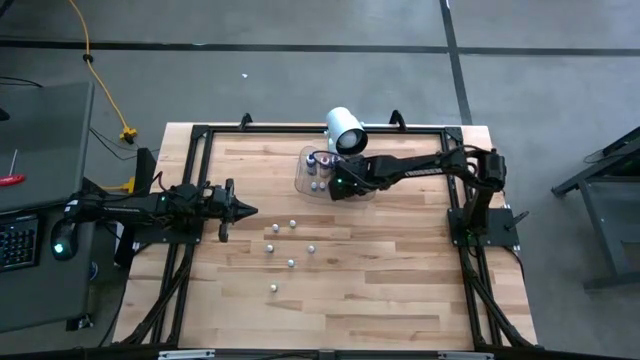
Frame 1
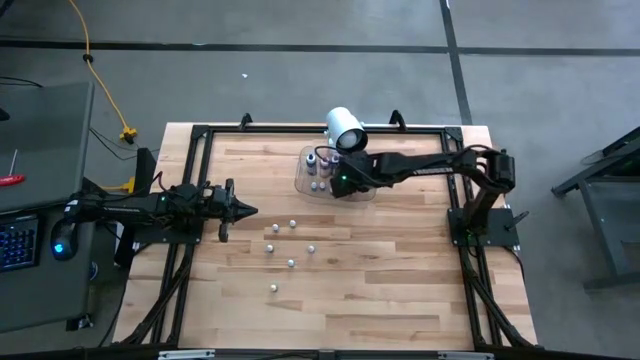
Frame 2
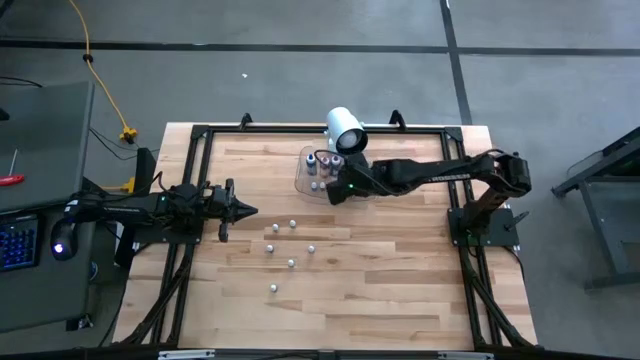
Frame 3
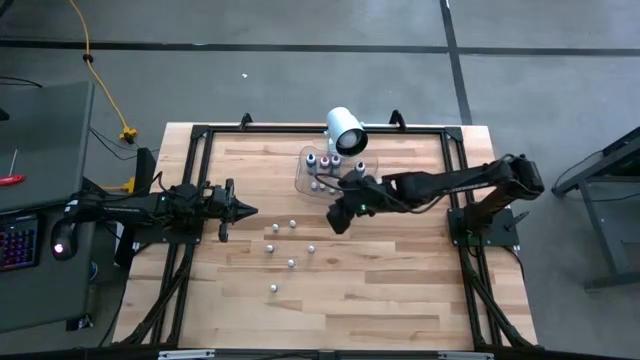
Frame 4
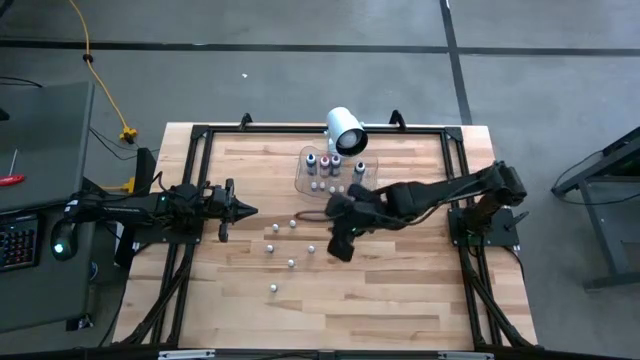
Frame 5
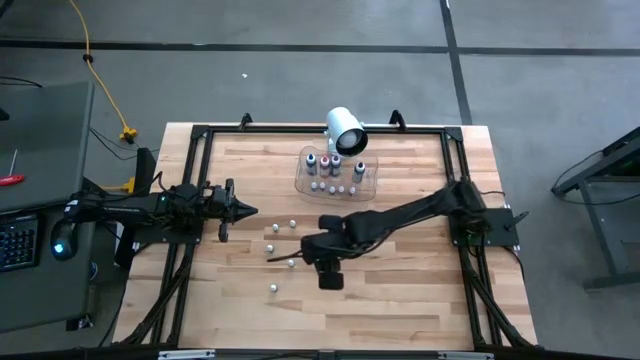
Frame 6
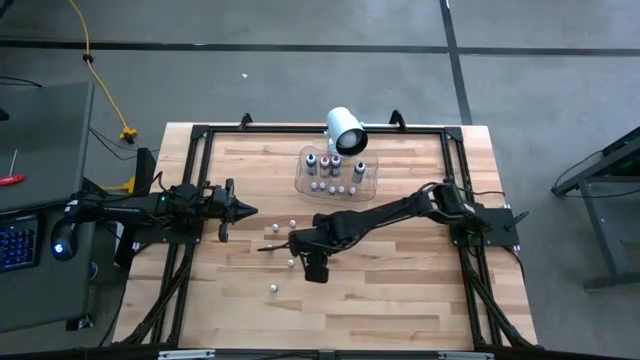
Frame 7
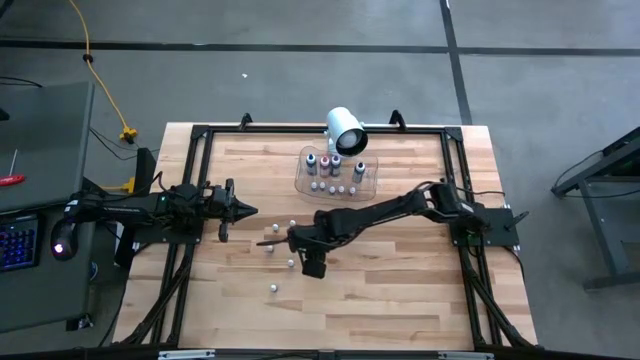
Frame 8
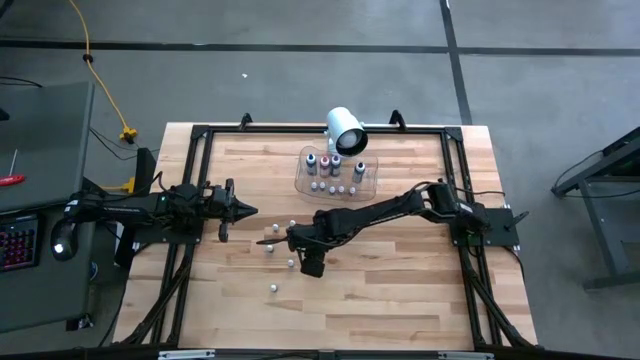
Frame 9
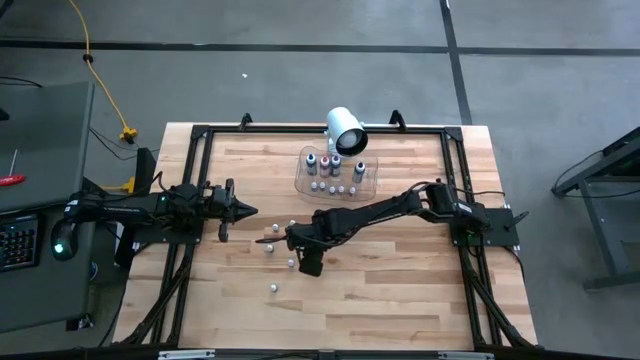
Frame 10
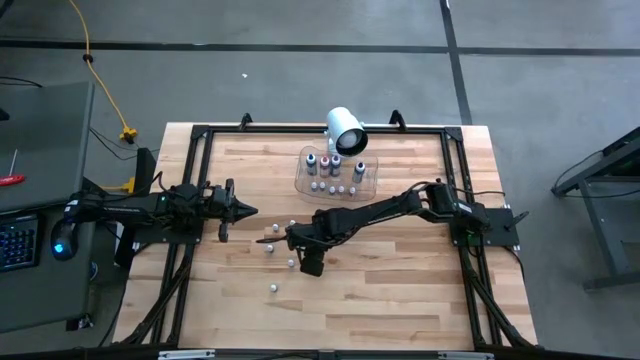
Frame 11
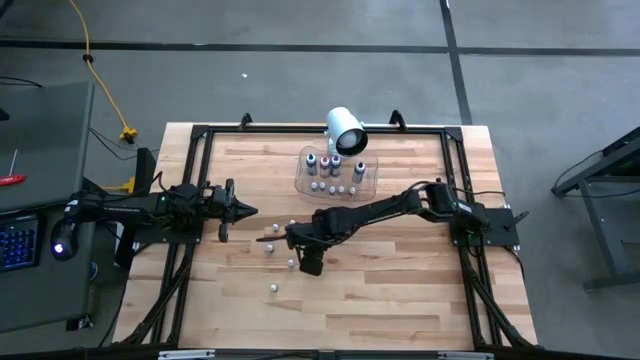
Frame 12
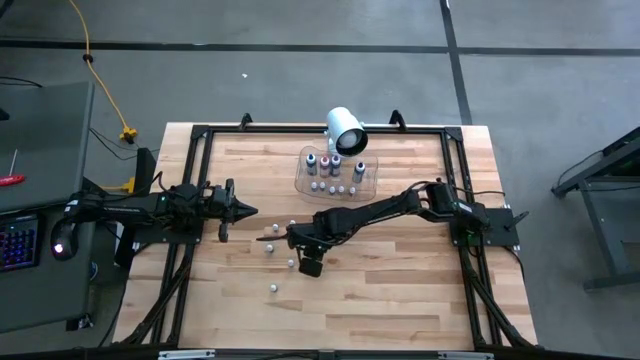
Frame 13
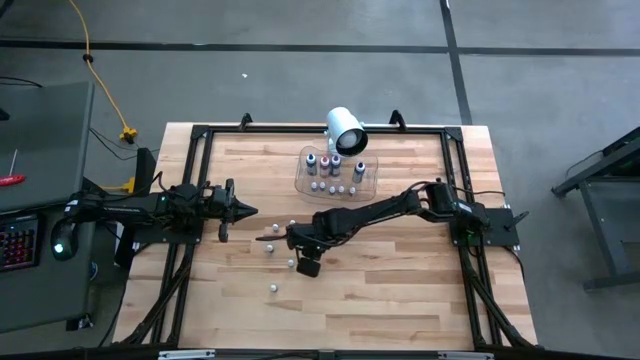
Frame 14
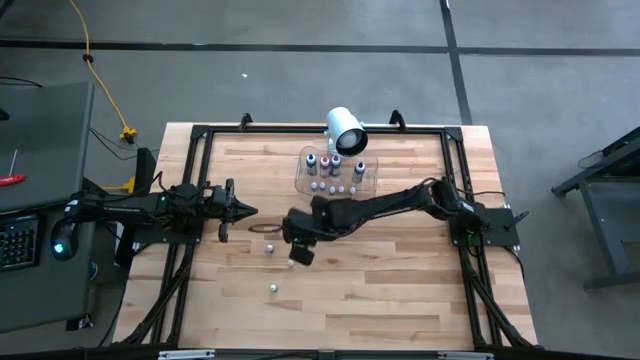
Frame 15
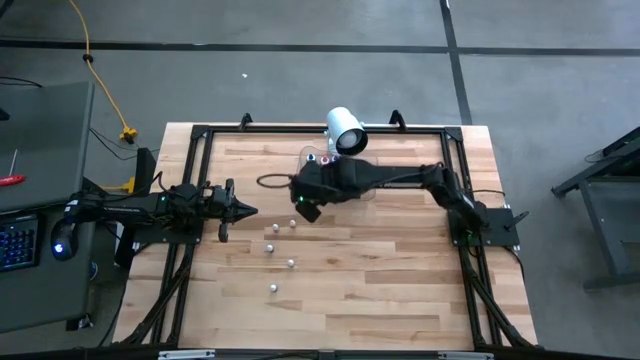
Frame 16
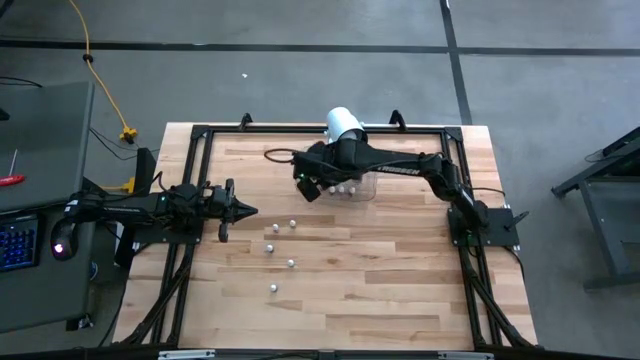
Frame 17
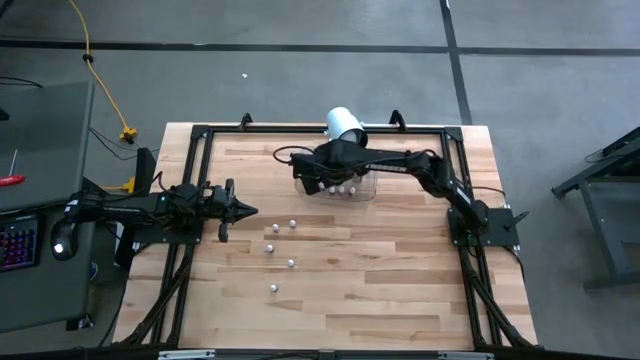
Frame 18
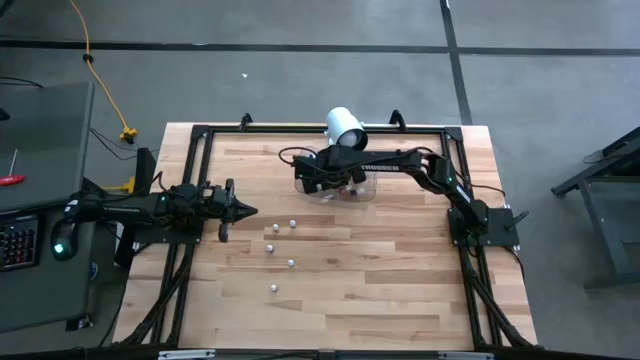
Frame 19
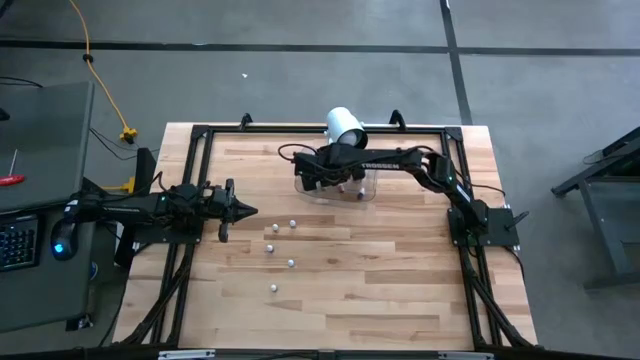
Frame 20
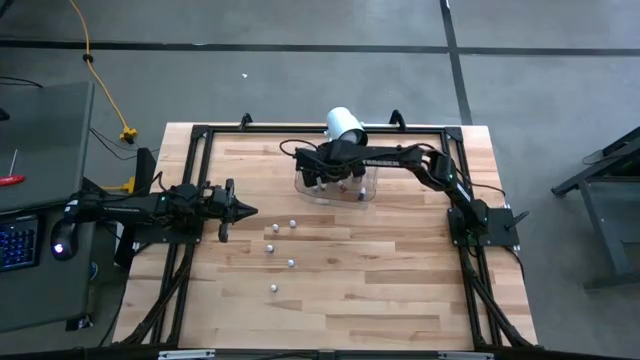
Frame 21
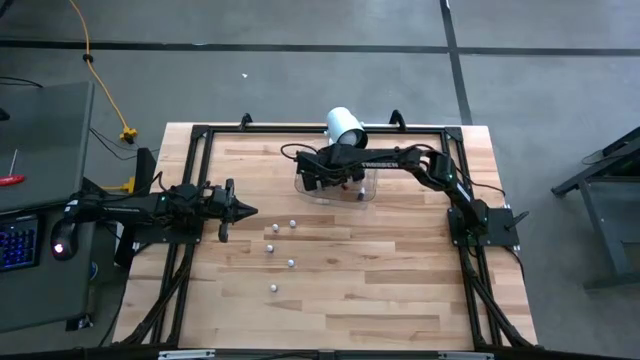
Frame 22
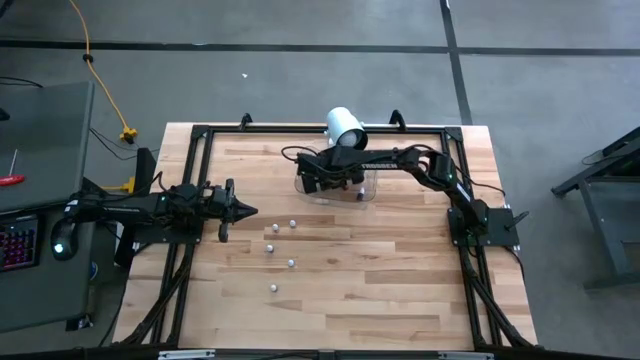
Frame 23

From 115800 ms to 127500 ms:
Task: Pick & Place food coloring
Put the small red food coloring bottle into the transparent bin

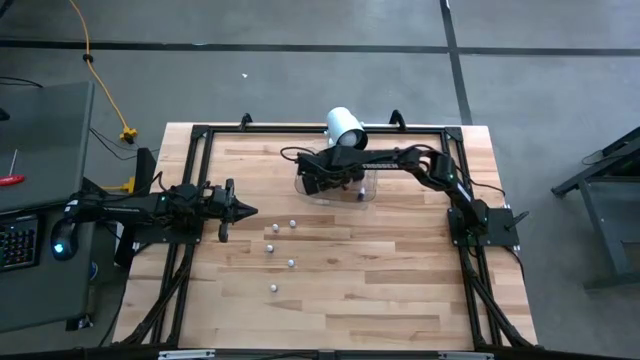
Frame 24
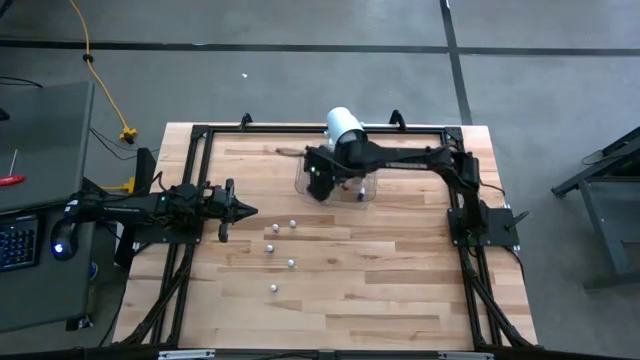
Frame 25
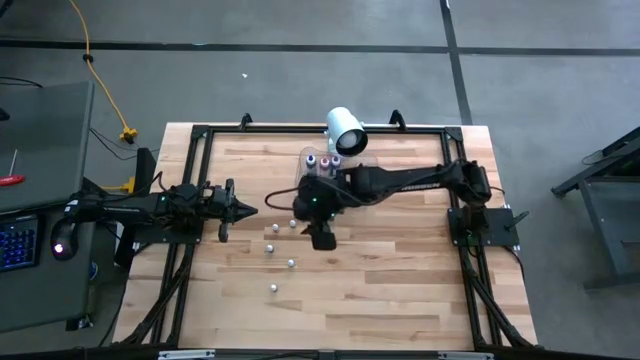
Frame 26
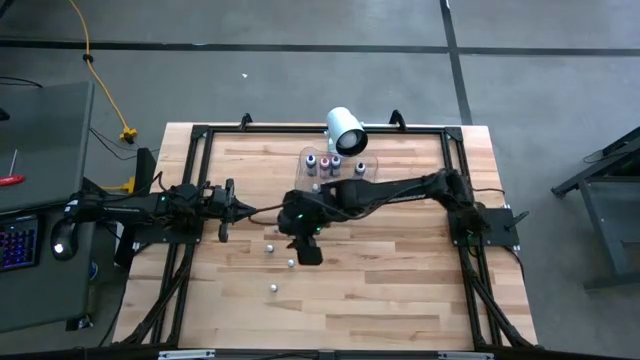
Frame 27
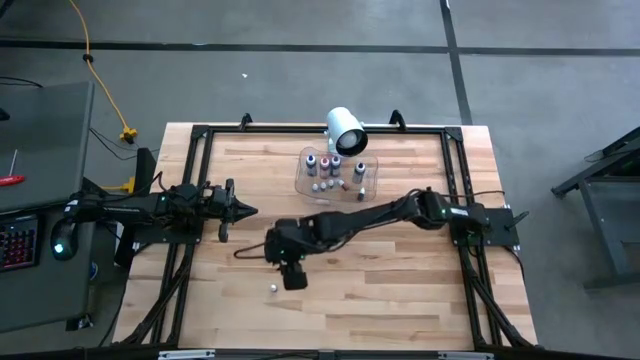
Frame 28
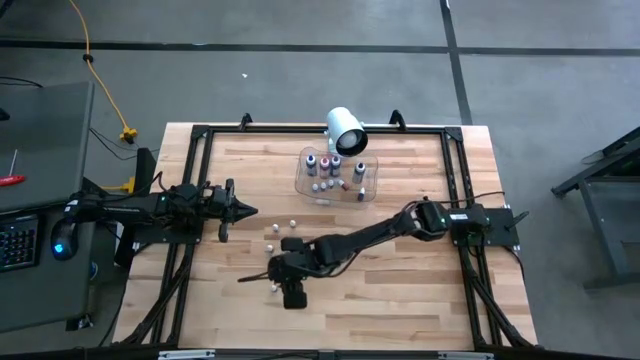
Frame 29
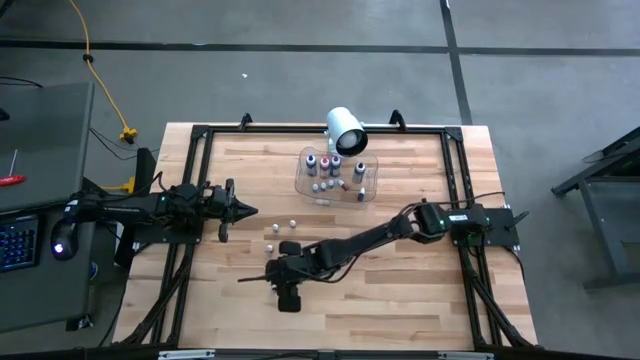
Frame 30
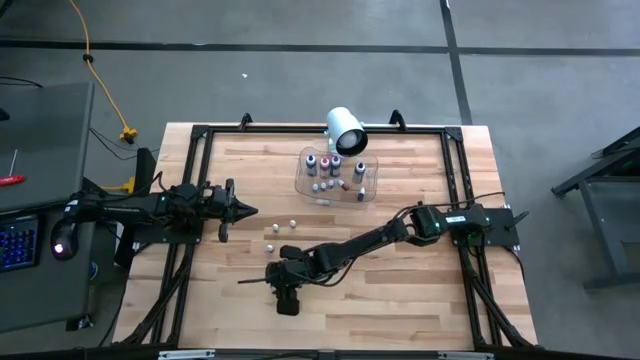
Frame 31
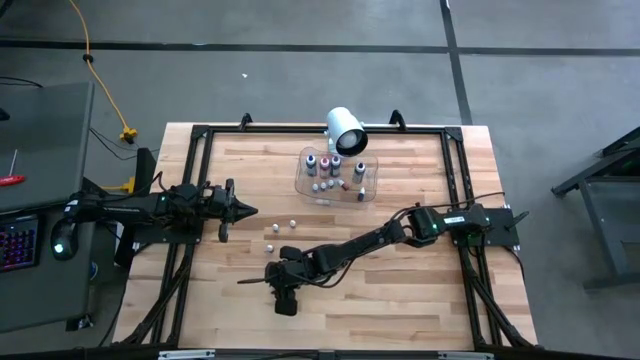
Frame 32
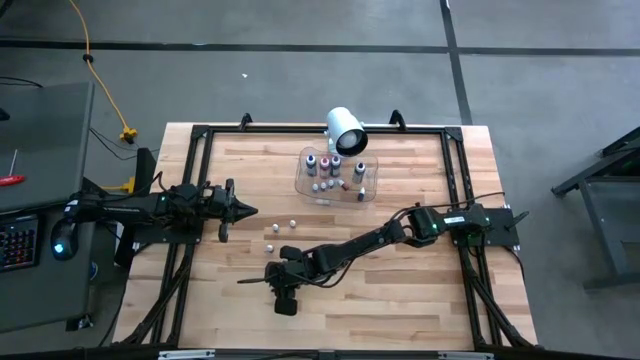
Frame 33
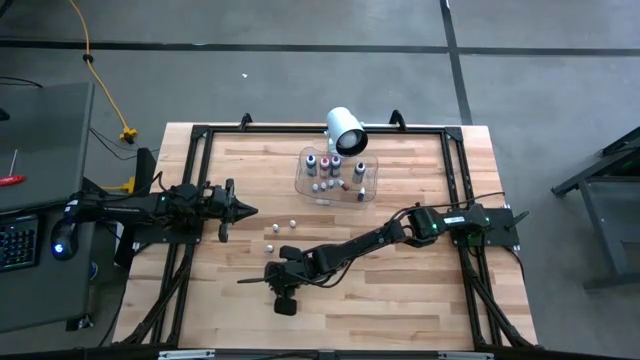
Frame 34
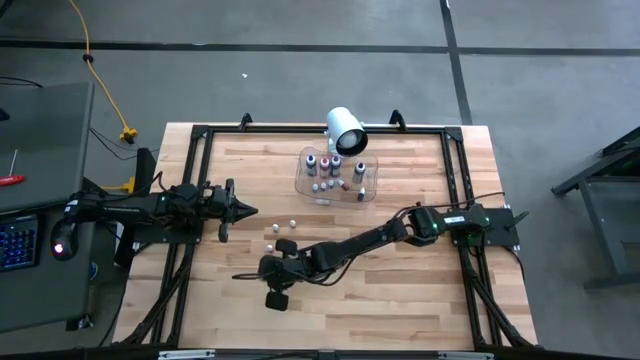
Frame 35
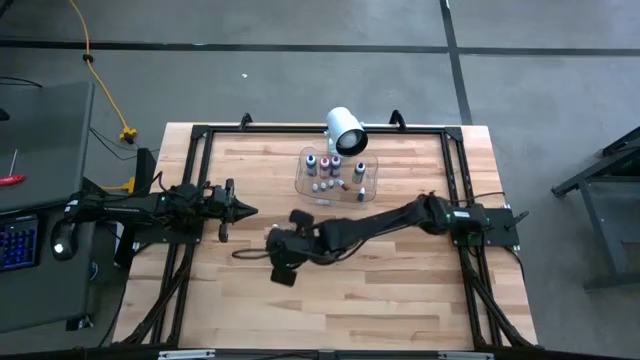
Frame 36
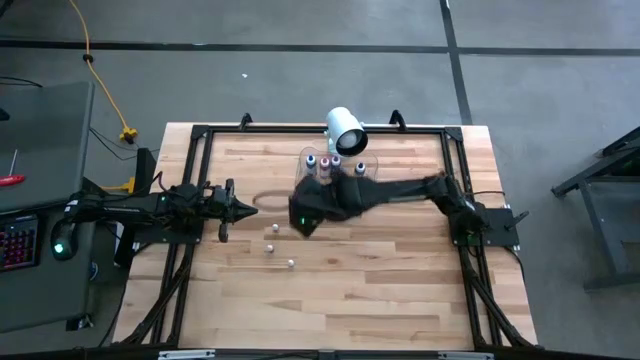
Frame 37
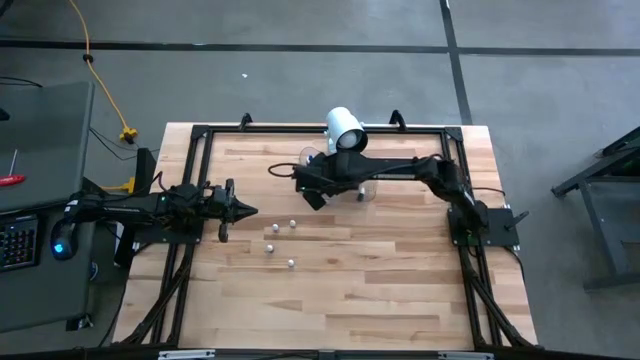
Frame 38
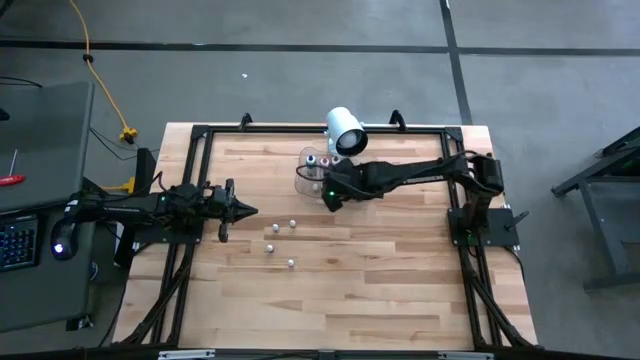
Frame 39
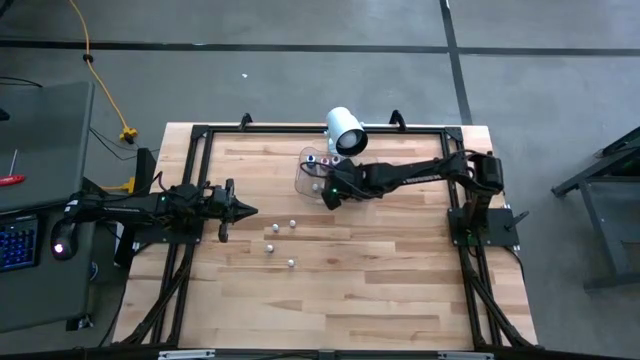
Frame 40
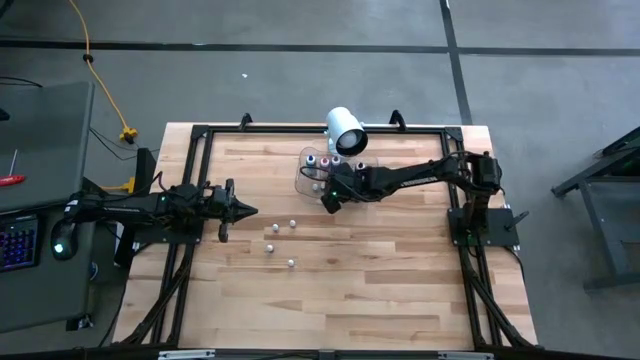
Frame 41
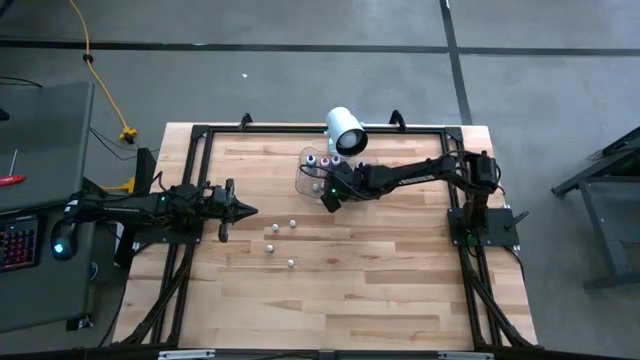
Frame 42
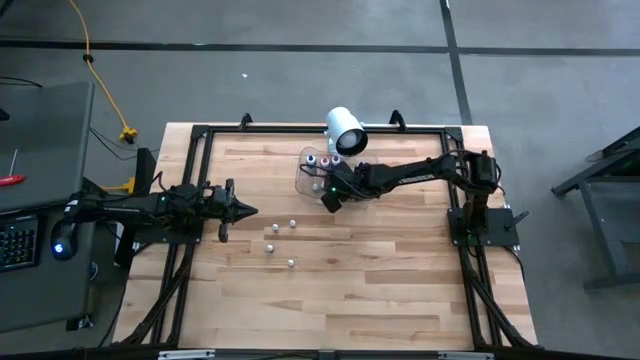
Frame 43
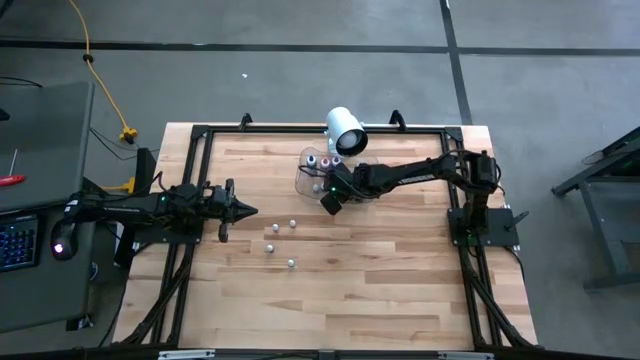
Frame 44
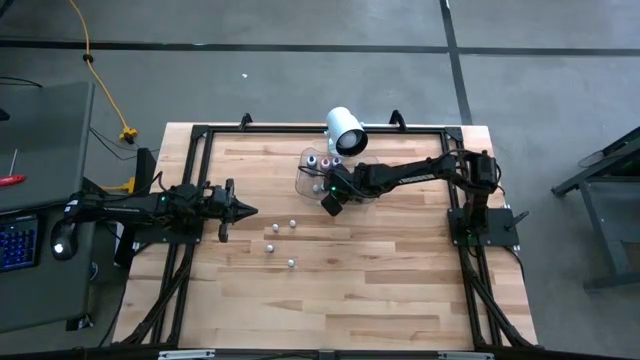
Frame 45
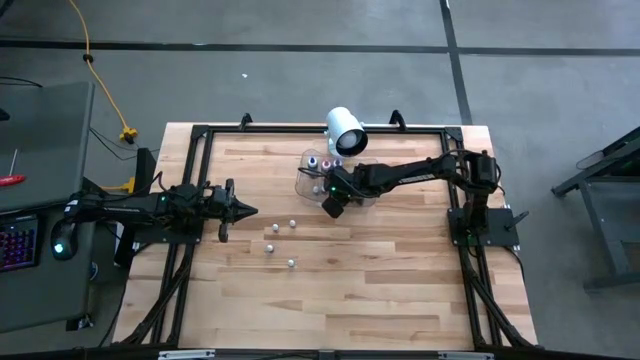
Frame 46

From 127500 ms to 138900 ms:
Put the small black food coloring bottle into the transparent bin
